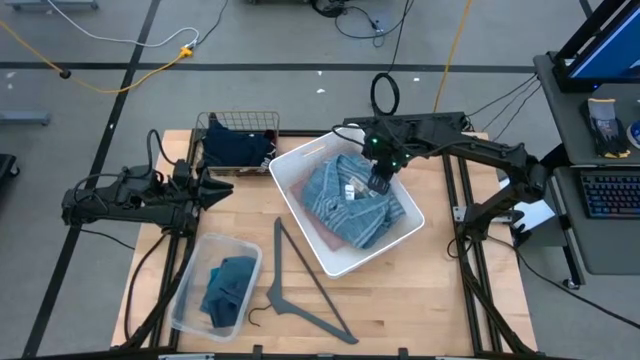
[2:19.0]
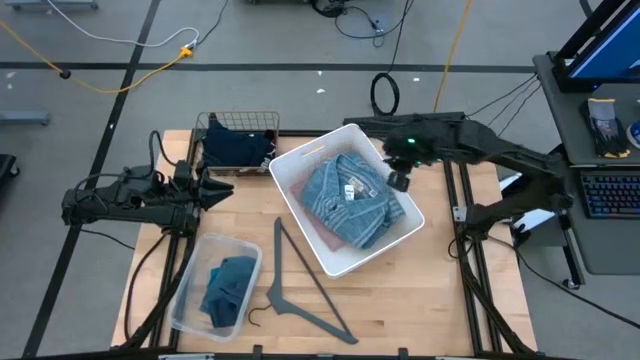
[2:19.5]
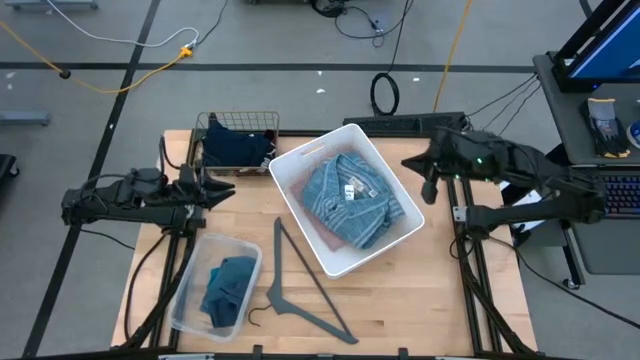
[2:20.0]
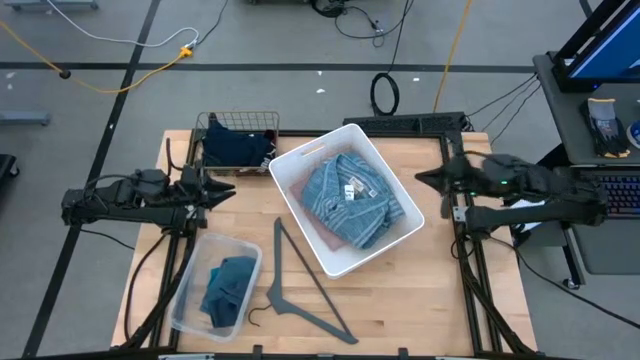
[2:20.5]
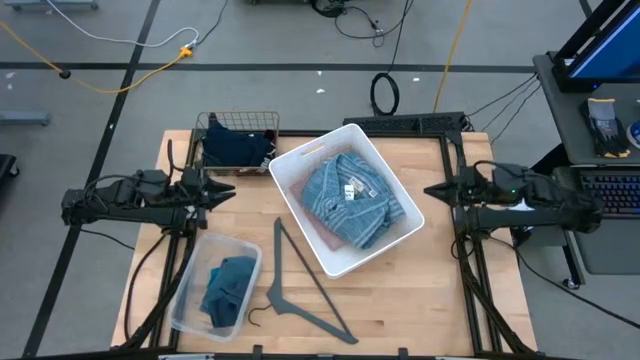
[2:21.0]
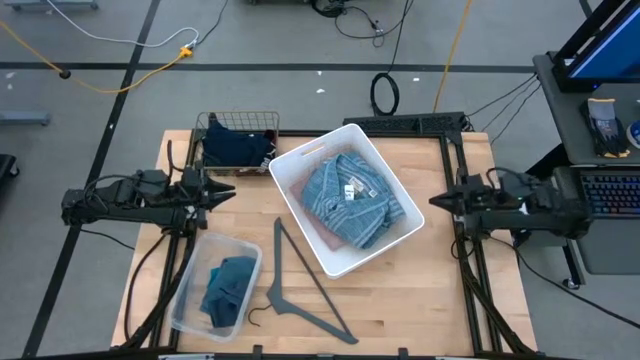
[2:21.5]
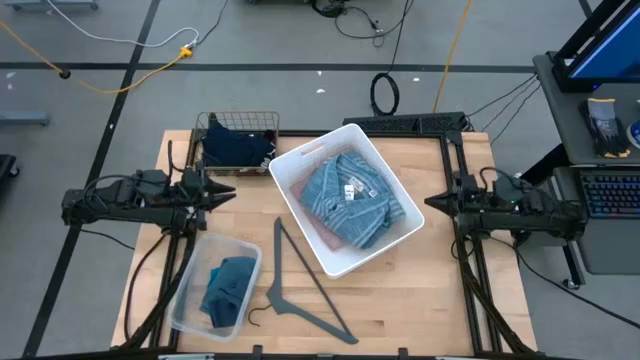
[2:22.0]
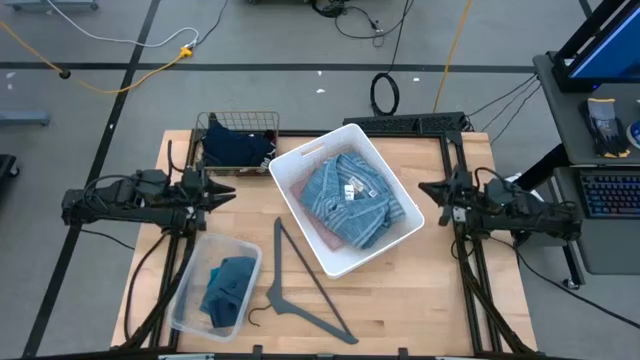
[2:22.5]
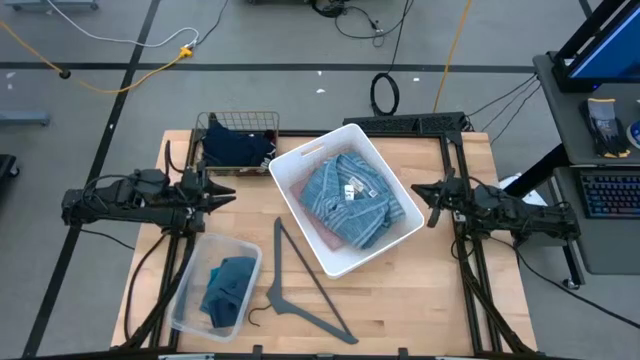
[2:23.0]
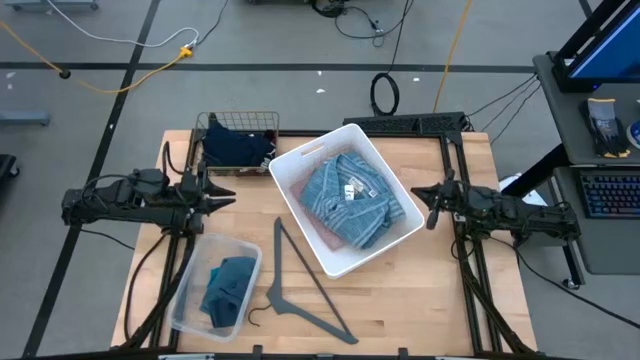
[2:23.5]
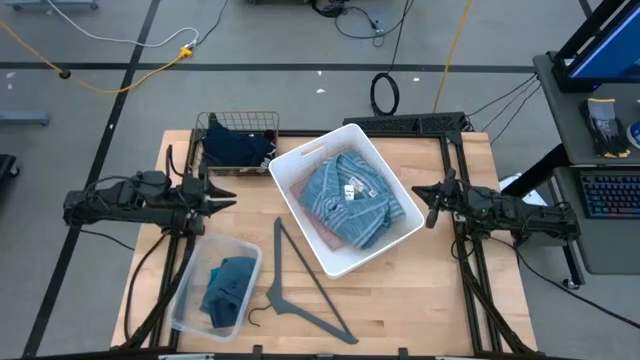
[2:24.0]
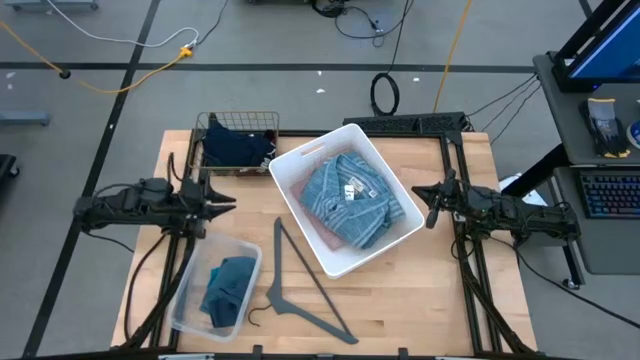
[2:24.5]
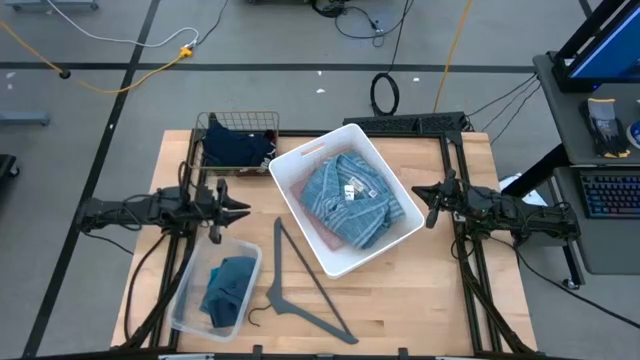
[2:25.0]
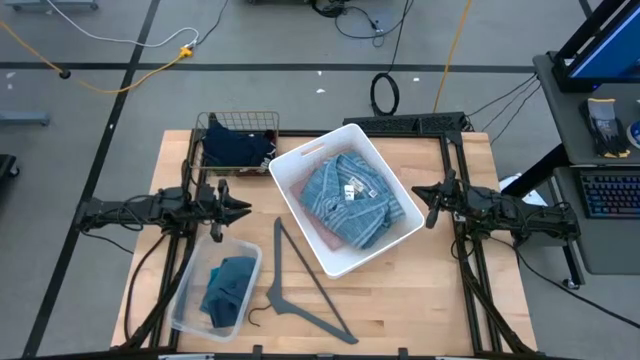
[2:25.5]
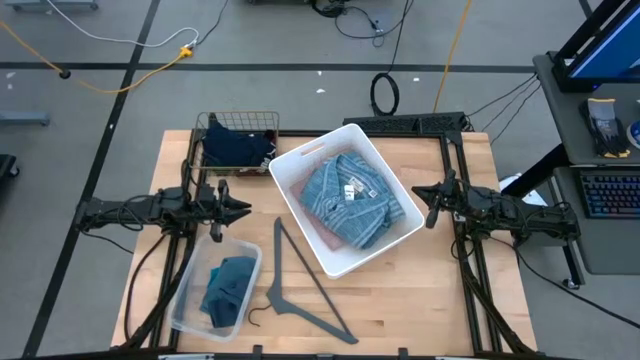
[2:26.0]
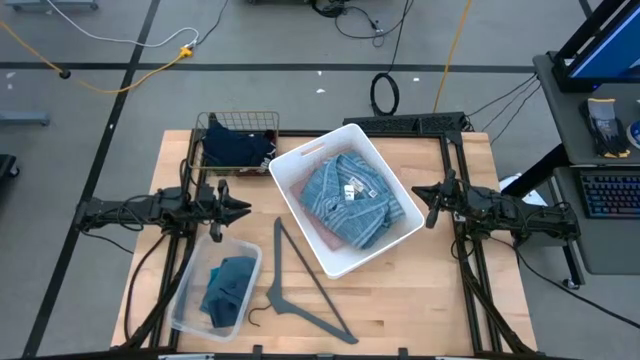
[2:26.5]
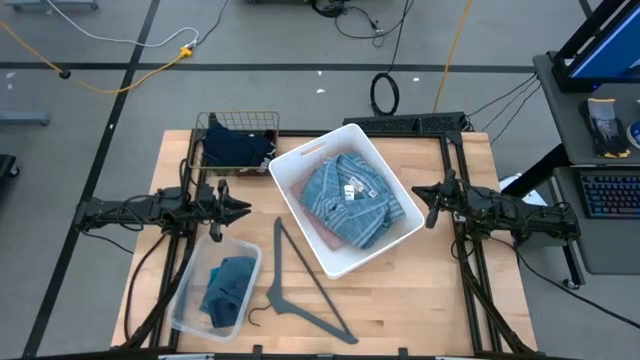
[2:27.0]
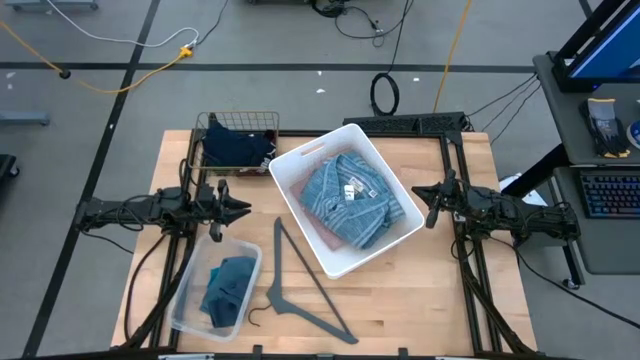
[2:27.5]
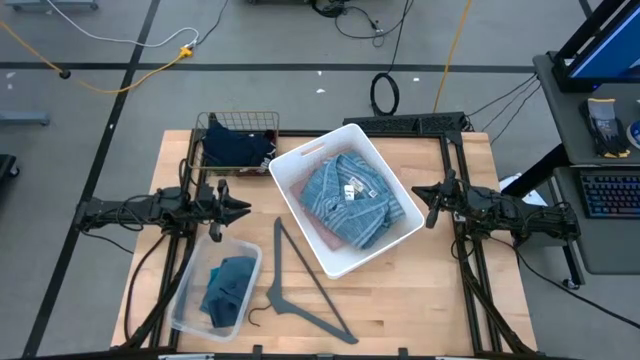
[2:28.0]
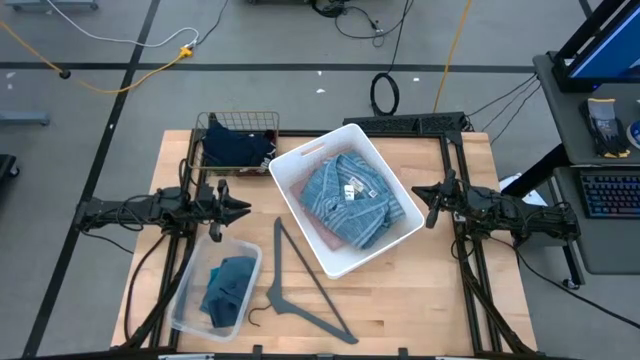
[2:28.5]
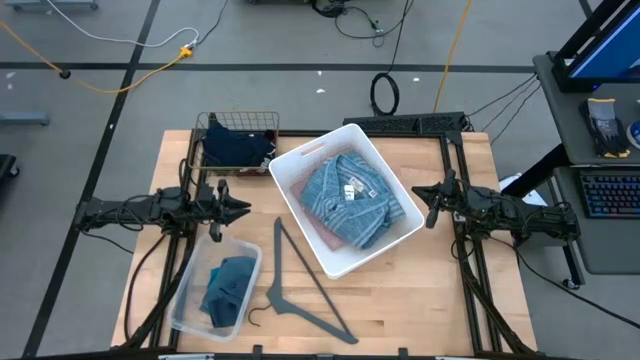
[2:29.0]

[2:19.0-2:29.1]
Task: Pick & Place Cloths
Return to Home Position

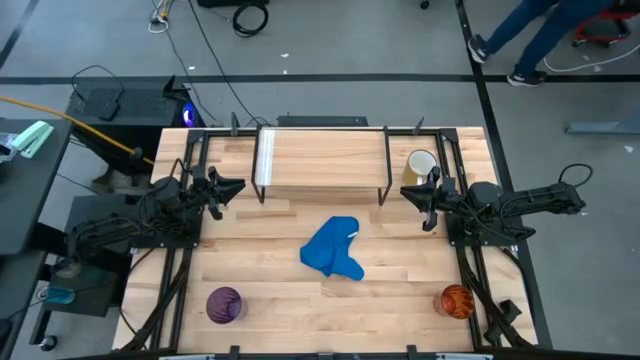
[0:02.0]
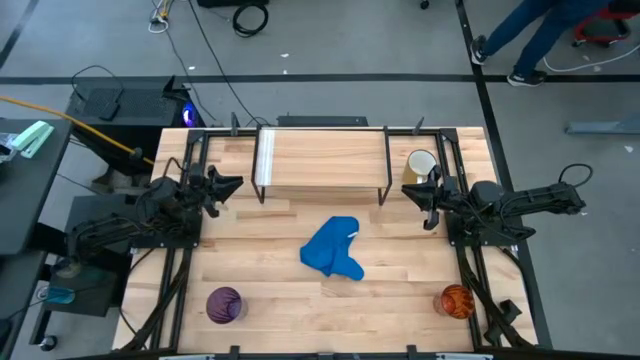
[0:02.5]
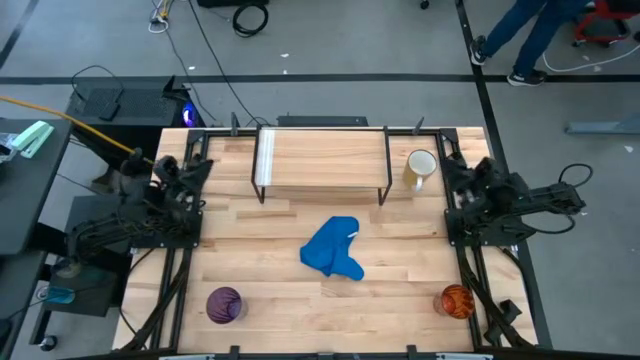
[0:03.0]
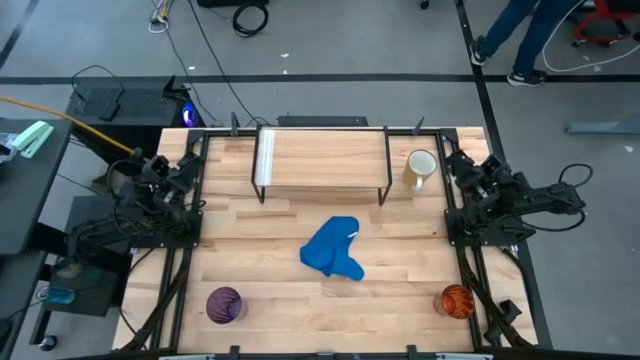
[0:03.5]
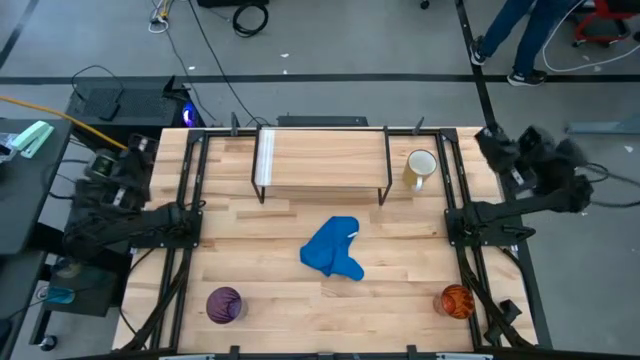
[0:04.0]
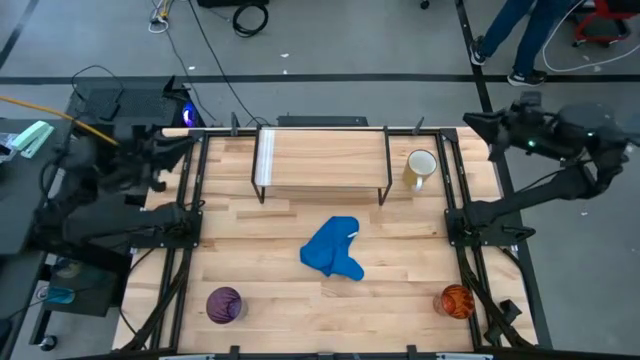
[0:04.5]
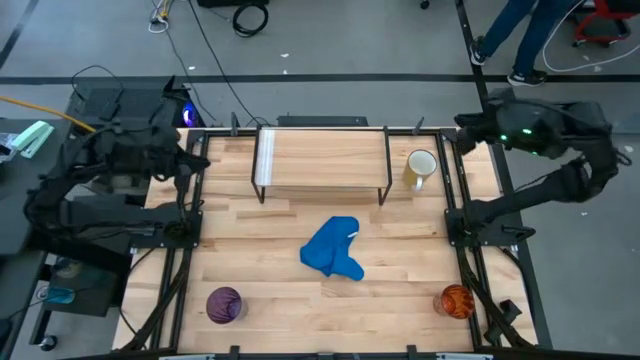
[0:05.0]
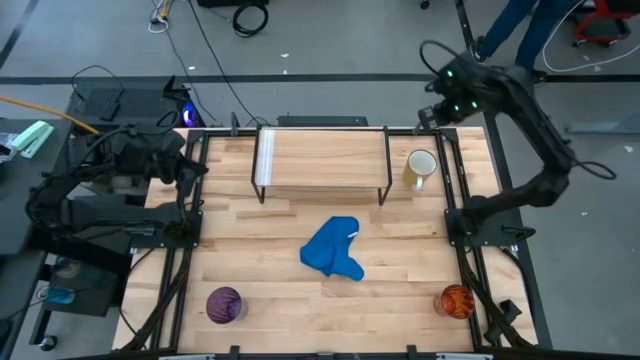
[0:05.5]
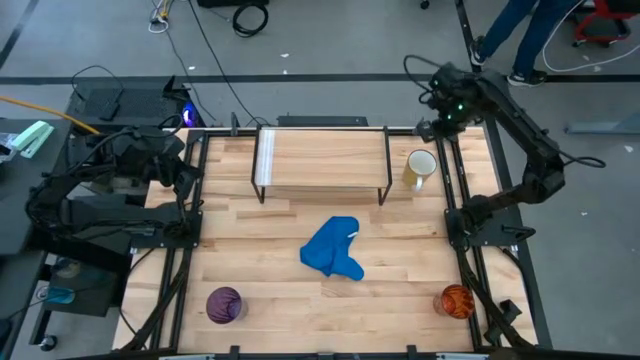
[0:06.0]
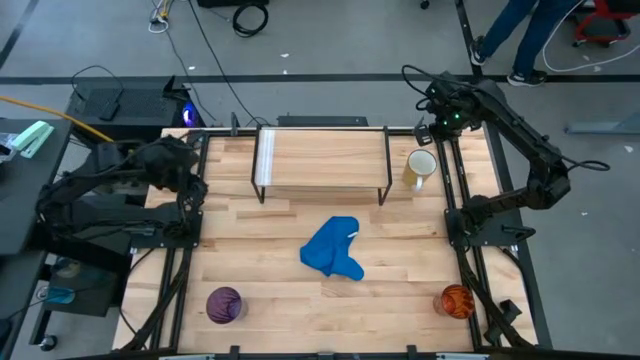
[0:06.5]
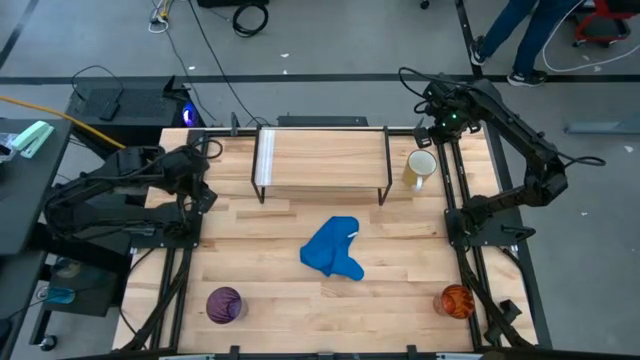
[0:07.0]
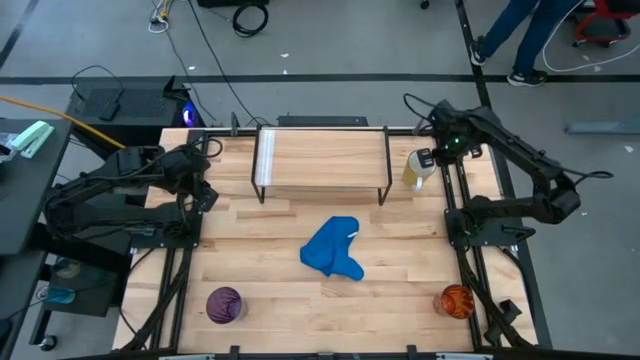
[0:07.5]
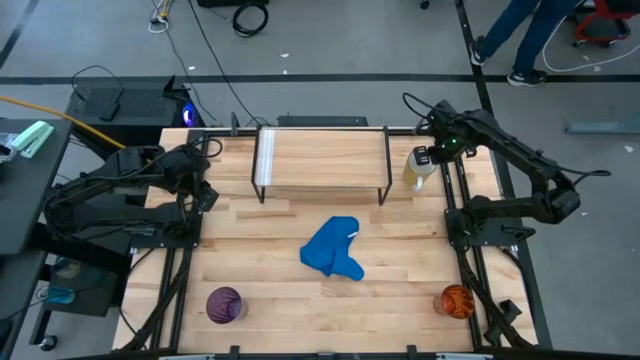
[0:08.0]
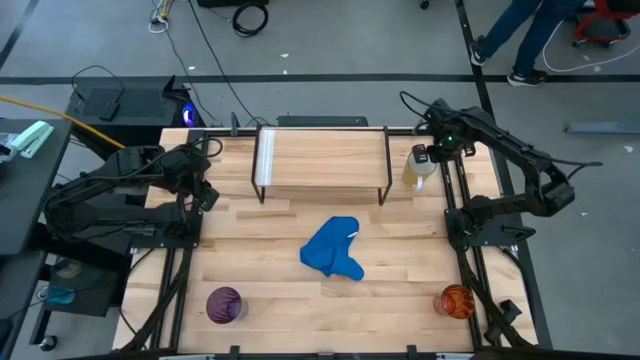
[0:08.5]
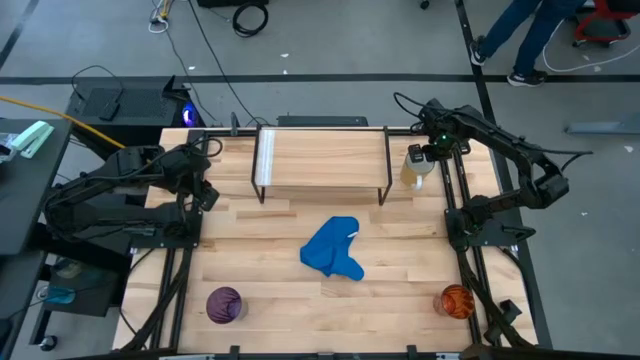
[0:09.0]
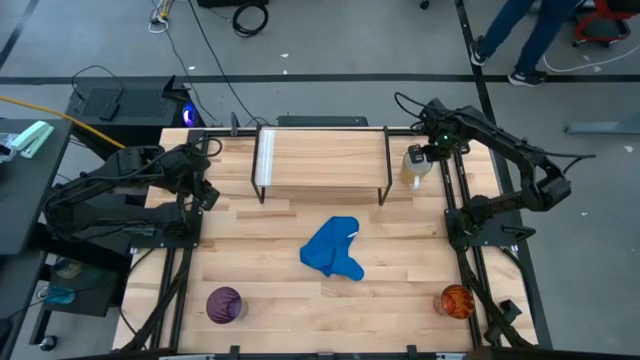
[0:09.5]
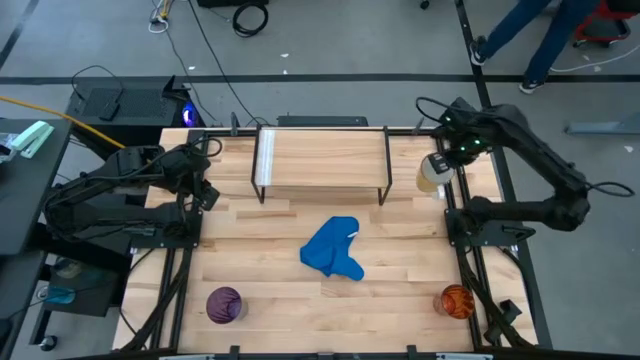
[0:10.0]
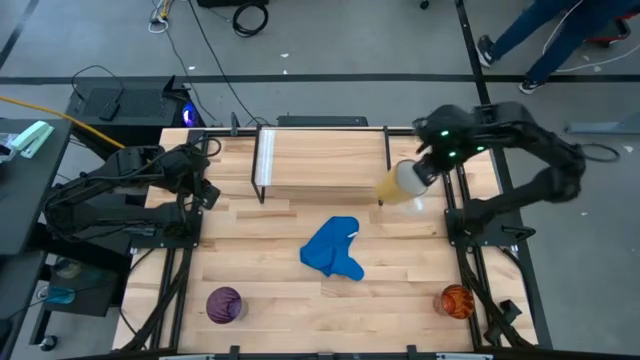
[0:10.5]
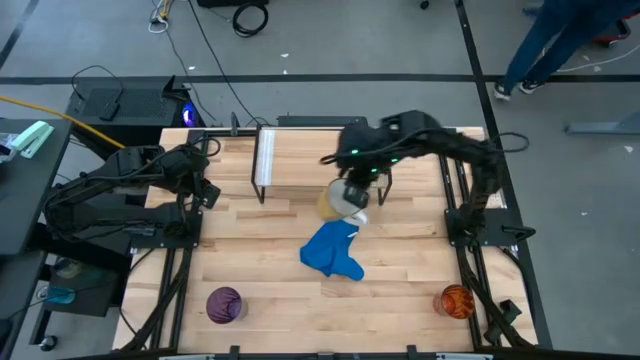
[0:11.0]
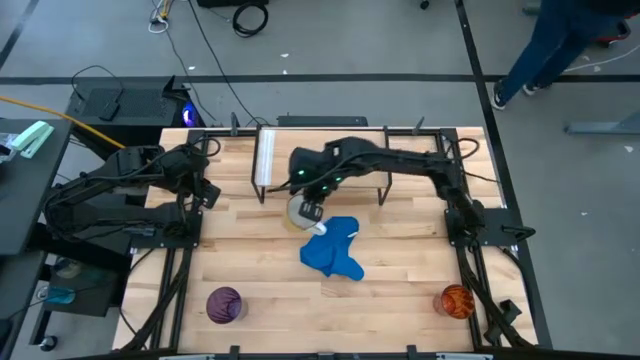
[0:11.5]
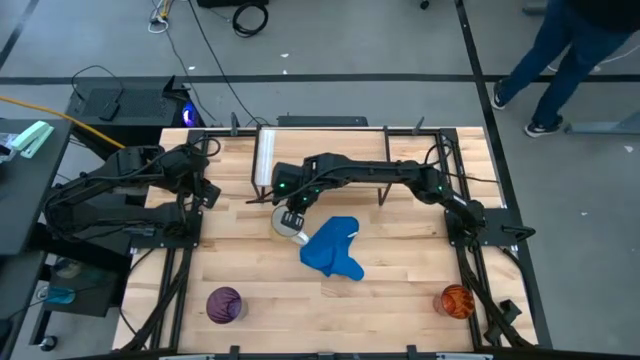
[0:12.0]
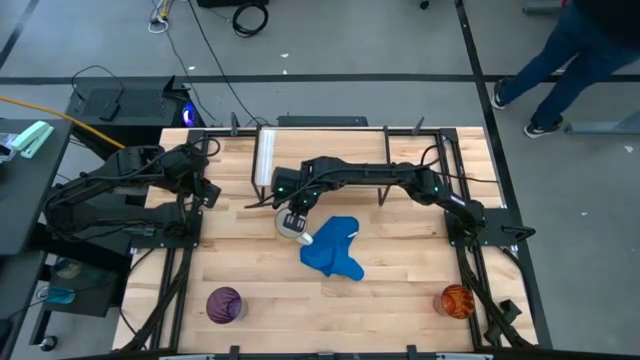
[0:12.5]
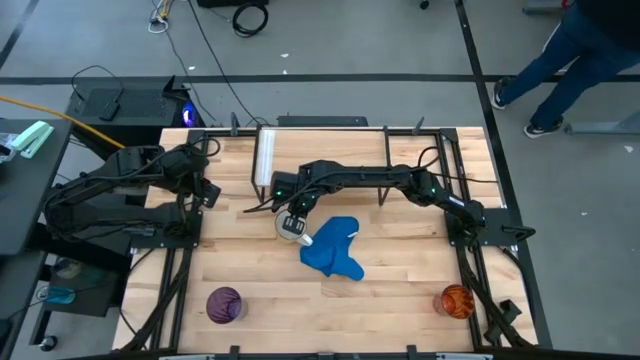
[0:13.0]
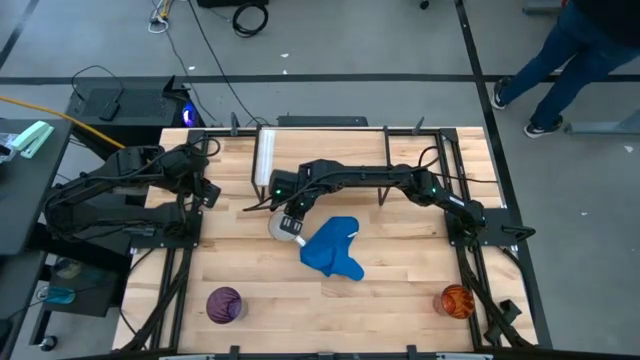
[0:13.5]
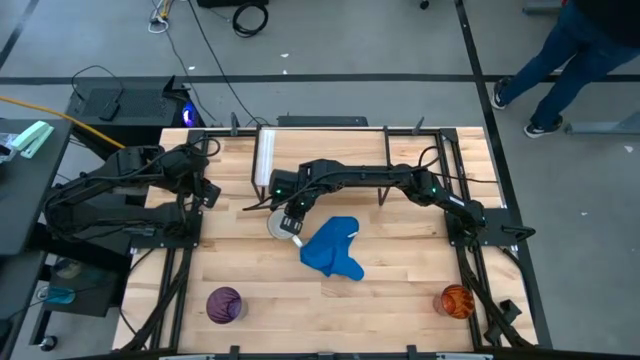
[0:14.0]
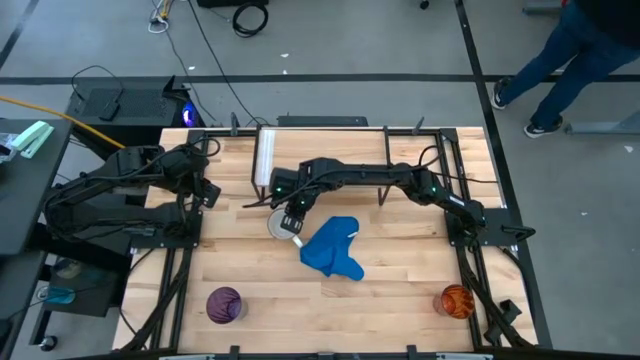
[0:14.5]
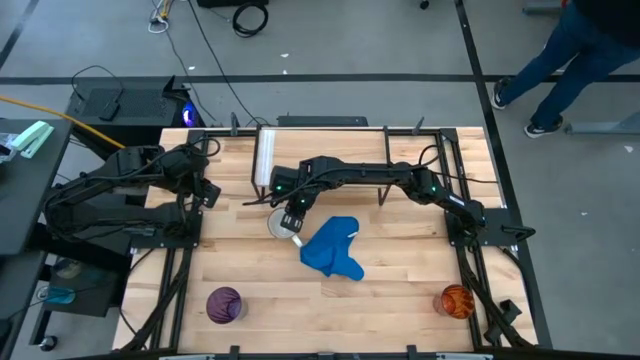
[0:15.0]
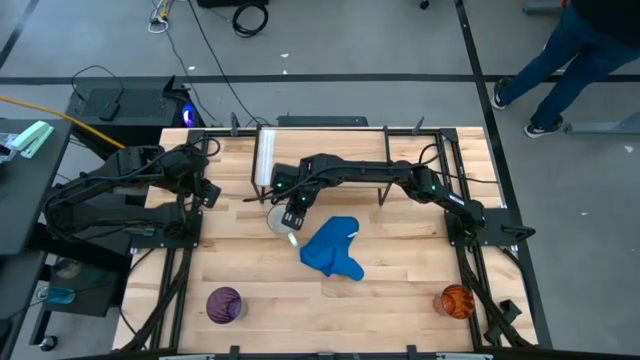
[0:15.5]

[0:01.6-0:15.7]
Task: Stack small to large cups/mugs on shelf
Move the yellow mug to the center of the table
